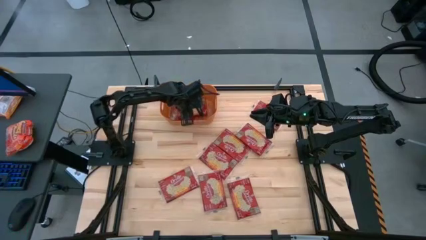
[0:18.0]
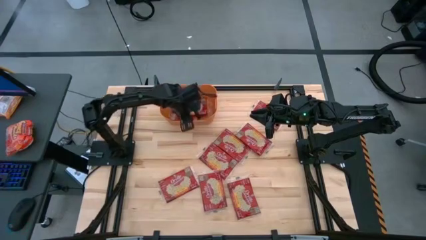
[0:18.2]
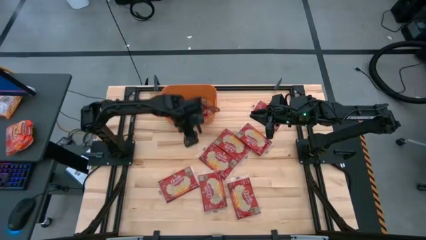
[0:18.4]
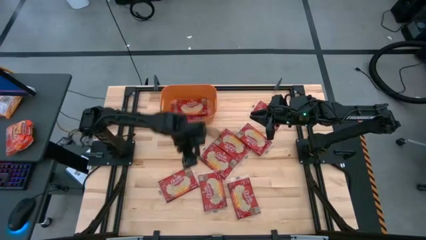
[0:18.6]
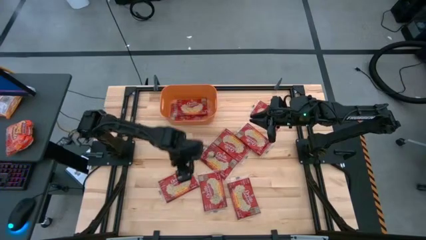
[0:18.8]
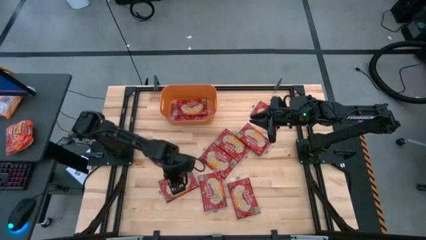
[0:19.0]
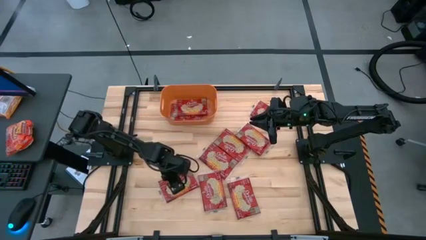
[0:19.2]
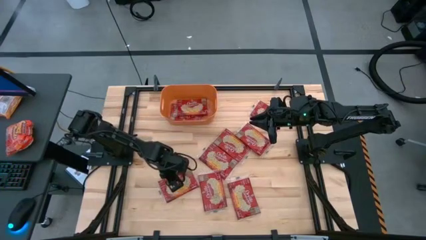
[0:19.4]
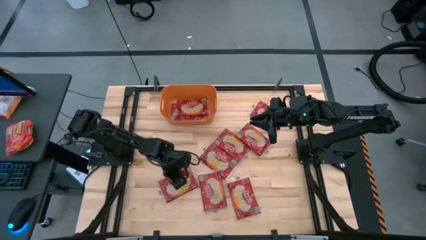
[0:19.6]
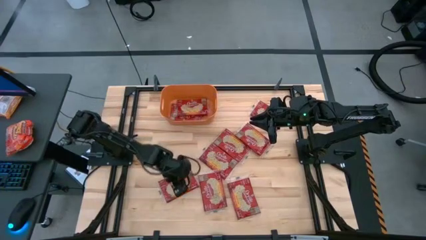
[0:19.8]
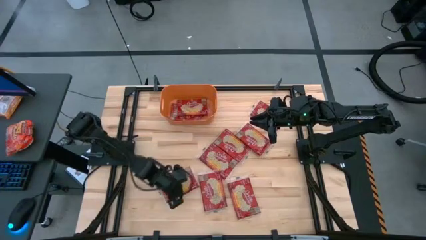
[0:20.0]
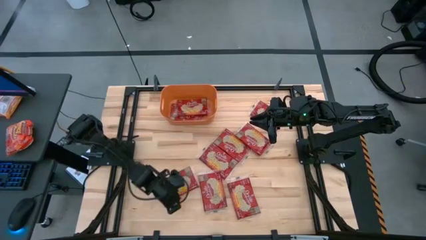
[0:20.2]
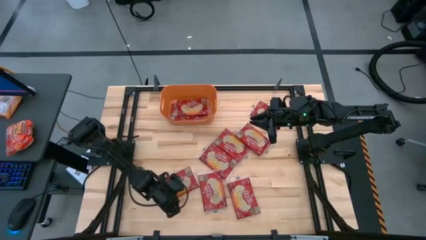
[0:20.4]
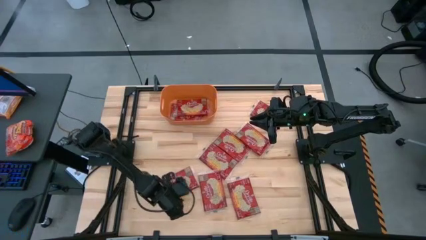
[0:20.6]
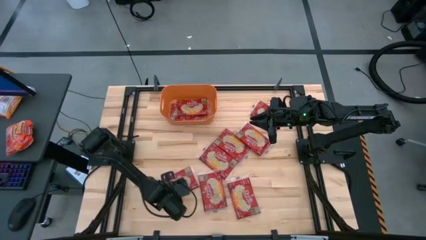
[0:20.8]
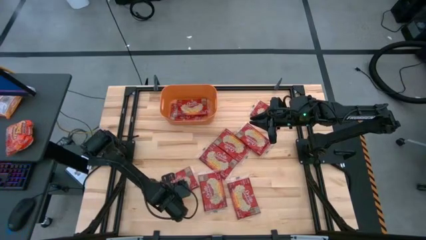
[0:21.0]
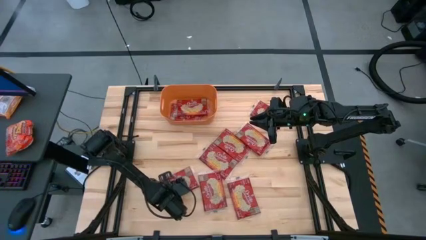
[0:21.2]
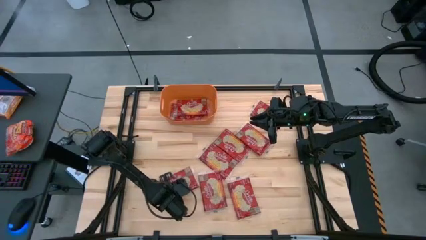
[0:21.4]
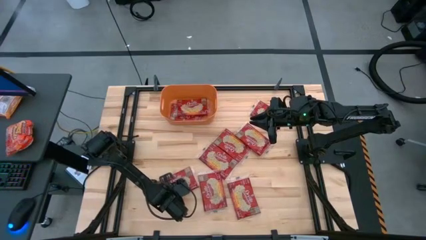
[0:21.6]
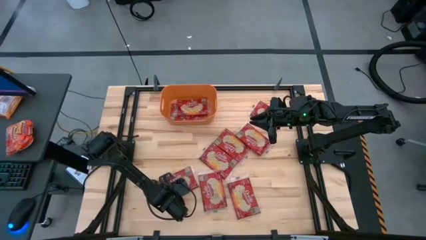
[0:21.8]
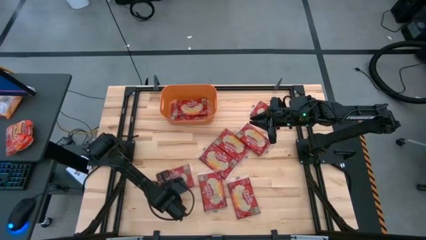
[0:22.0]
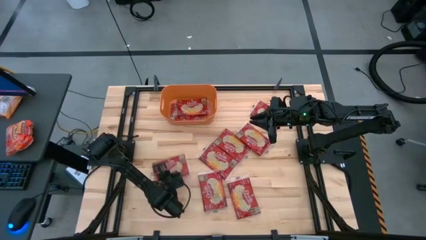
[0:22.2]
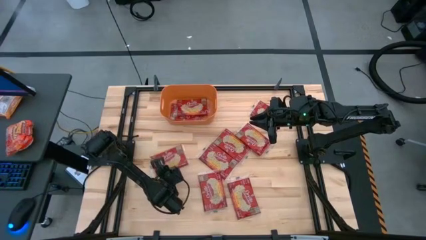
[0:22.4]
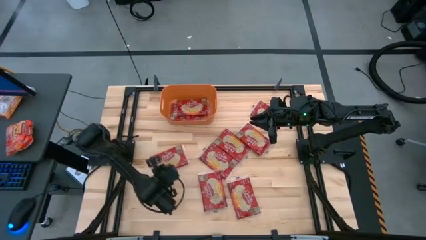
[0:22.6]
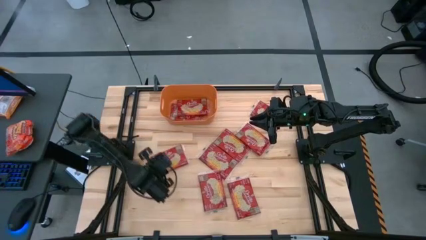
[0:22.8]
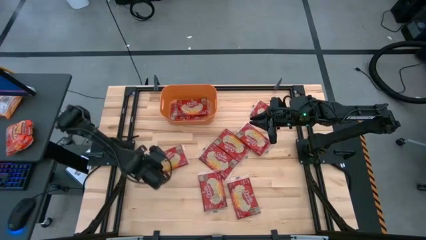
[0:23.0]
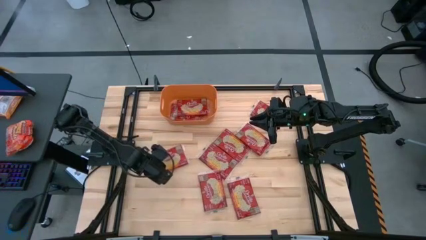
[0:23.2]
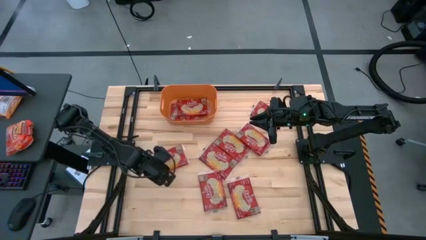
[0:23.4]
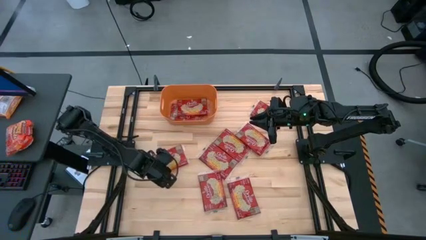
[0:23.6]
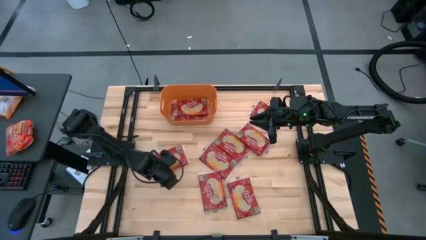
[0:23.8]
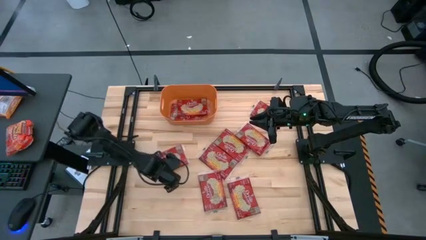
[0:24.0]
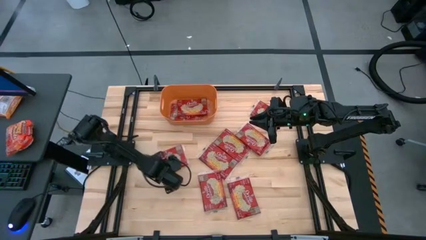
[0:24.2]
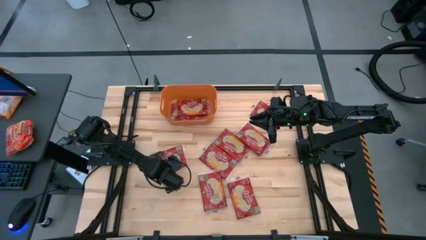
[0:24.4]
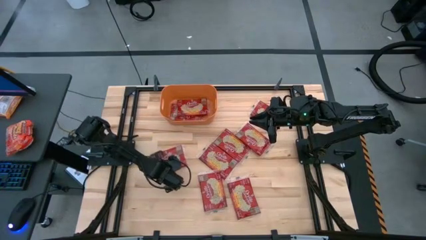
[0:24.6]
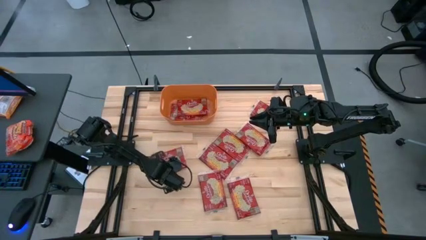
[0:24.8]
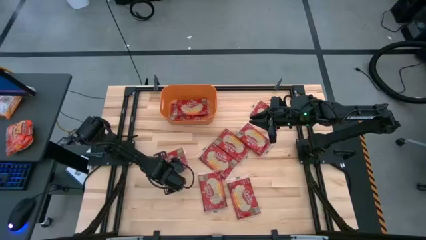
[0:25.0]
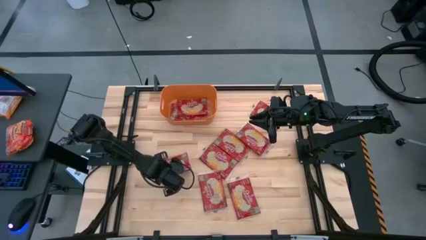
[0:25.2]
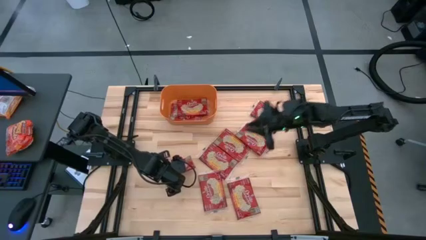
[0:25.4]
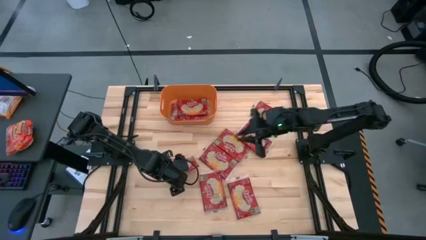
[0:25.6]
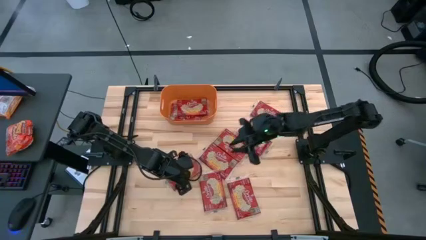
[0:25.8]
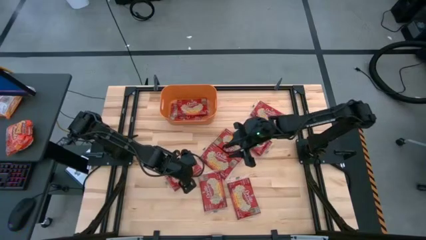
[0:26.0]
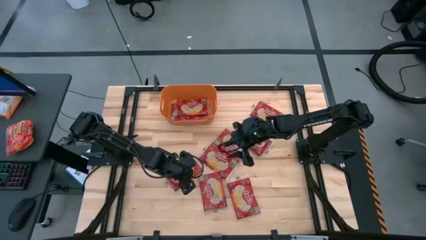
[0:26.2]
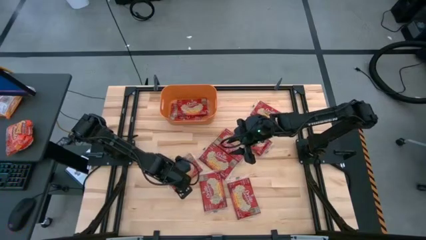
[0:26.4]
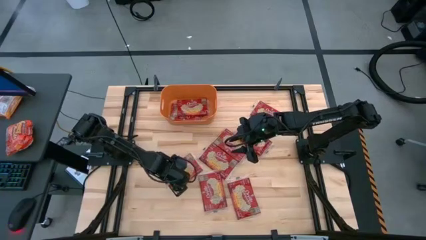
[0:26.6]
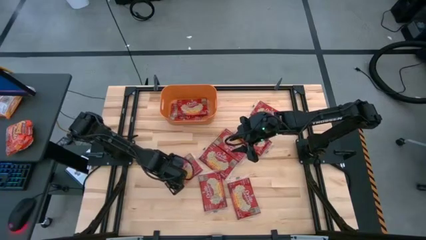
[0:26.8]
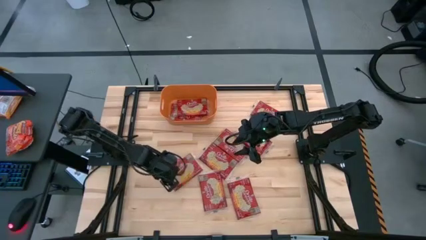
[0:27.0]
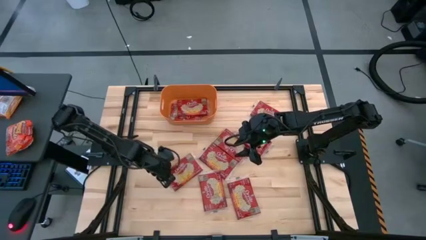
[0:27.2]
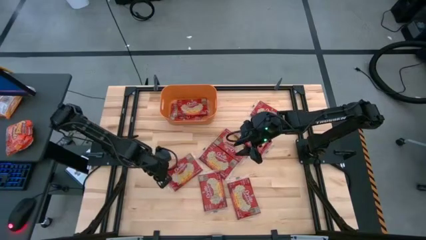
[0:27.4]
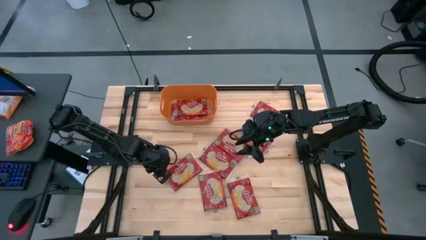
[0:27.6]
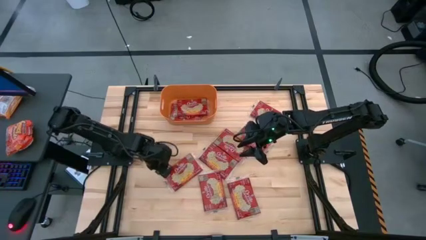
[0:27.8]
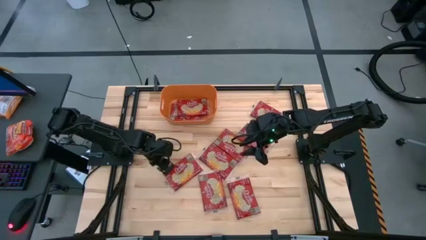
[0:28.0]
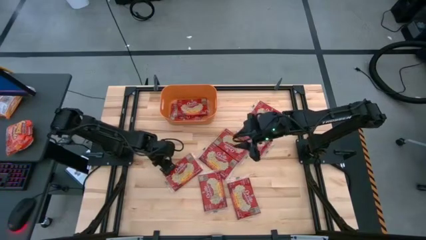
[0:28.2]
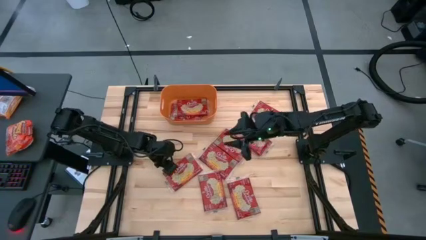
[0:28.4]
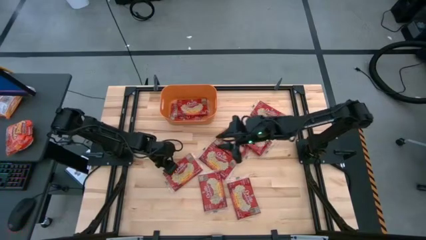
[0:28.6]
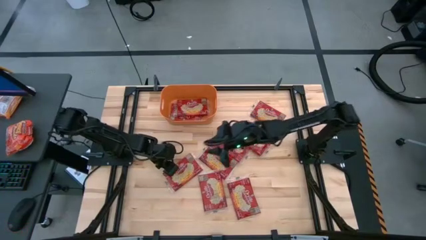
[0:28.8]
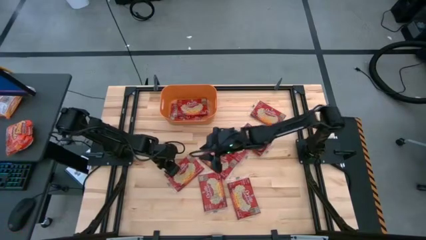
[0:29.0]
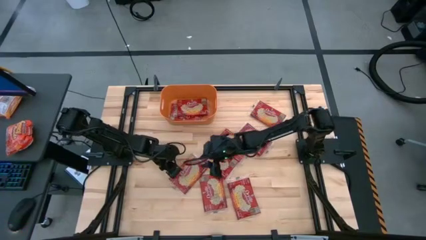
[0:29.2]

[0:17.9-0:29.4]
Task: Sort popcorn bags into baskets
Put the red popcorn bag into the orange bin

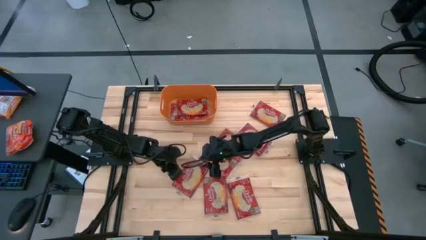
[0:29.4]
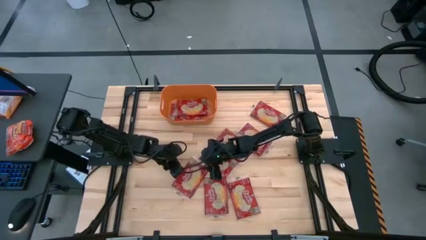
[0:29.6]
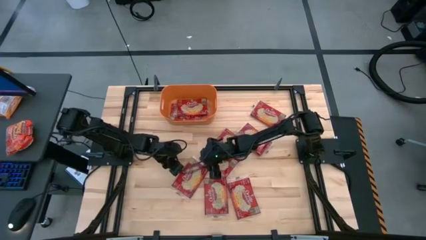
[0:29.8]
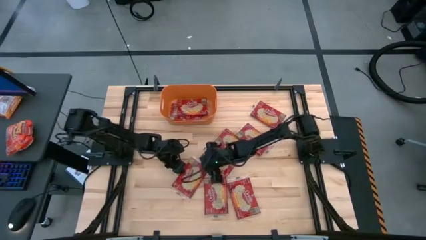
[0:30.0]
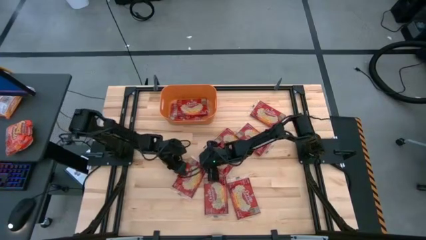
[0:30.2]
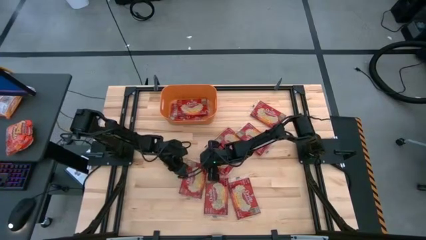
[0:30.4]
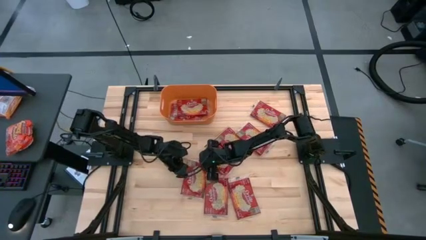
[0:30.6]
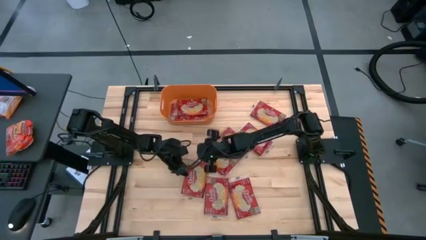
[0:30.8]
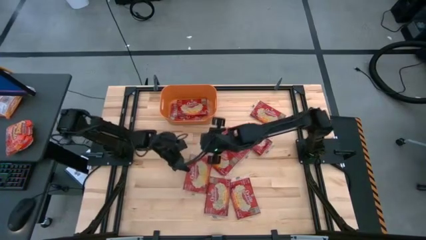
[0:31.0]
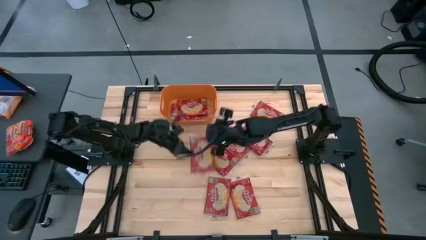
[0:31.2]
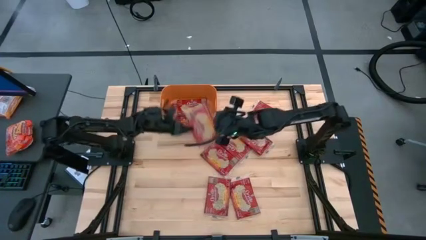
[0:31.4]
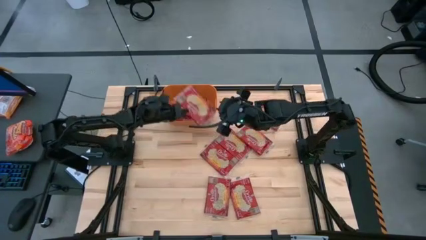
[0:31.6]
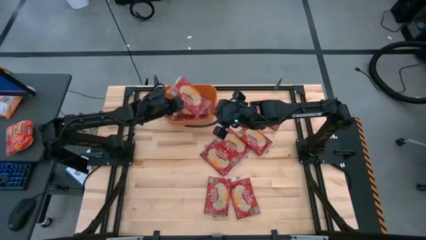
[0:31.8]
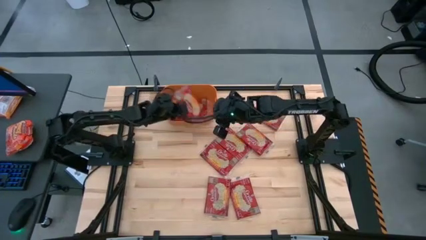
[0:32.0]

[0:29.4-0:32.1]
Put the red popcorn bag into the orange bin

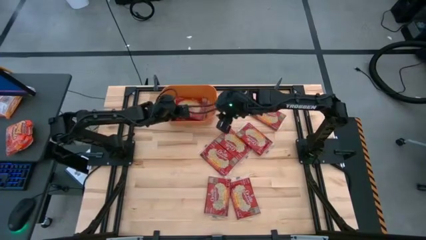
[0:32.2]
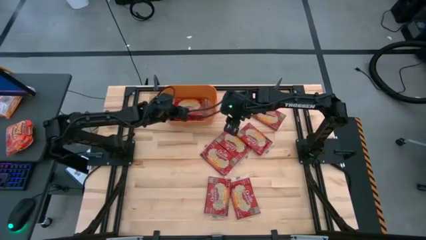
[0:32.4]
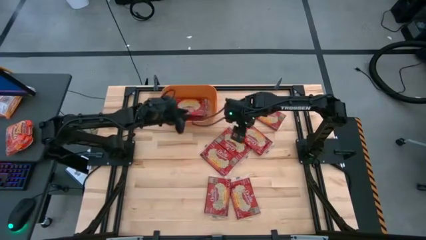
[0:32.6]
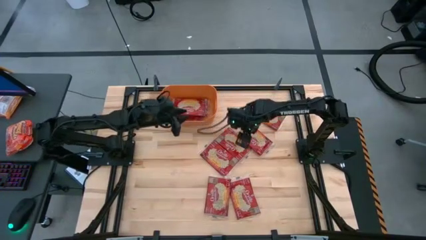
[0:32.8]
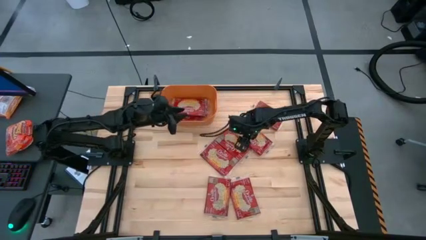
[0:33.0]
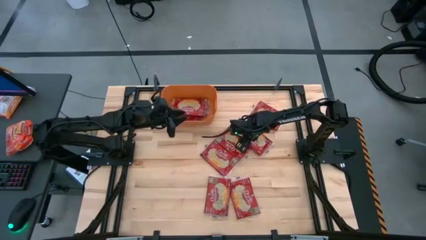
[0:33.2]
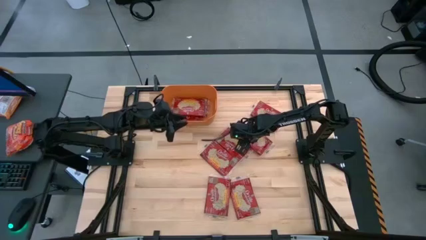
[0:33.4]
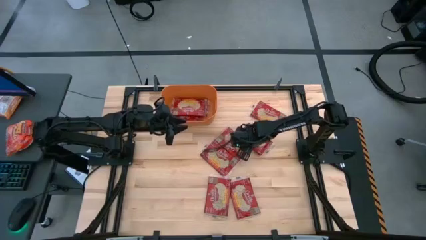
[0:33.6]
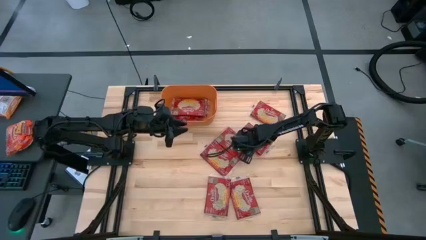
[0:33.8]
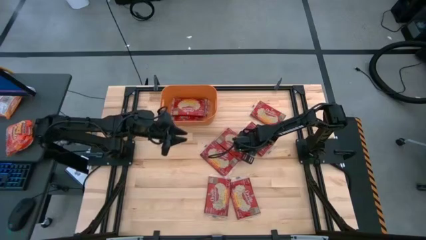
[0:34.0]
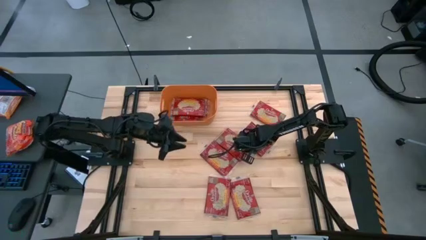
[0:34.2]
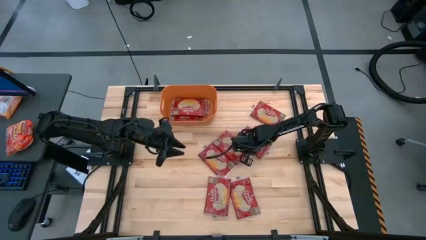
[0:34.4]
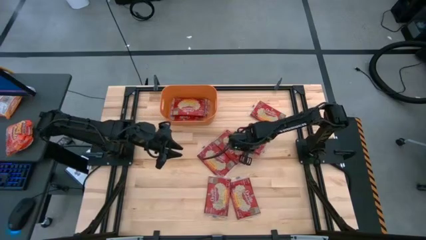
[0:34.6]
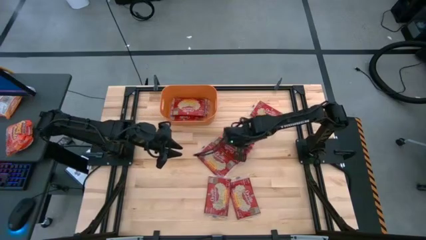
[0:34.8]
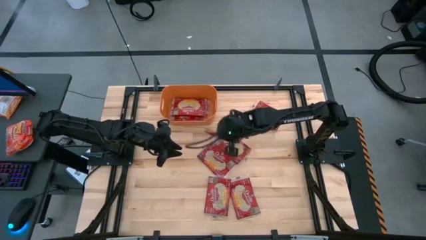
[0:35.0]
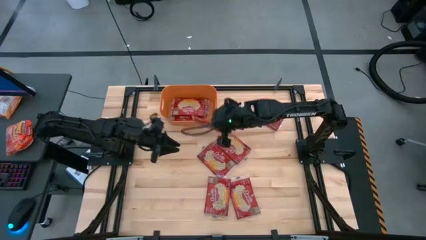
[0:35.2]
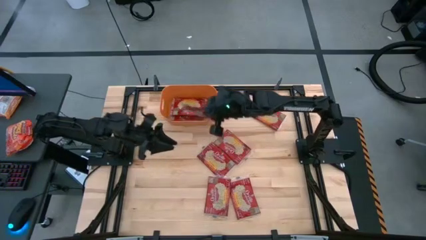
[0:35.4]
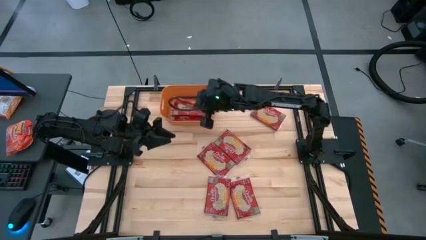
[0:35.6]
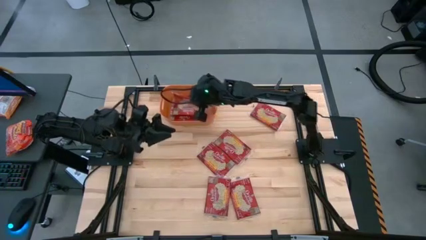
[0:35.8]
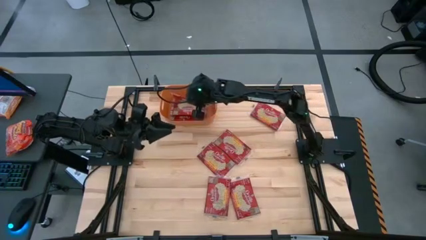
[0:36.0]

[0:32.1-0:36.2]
Put the red popcorn bag into the orange bin
